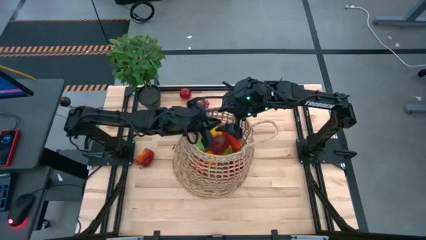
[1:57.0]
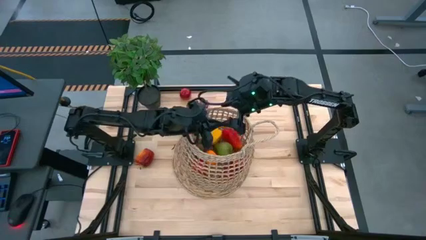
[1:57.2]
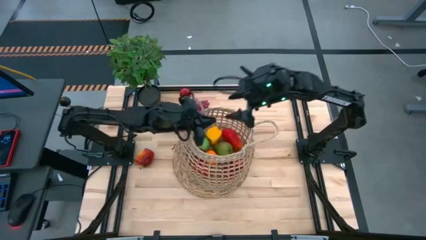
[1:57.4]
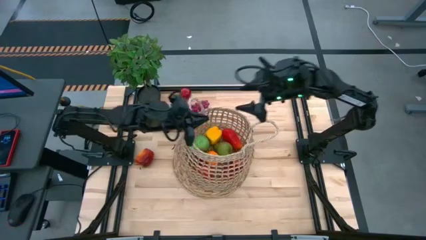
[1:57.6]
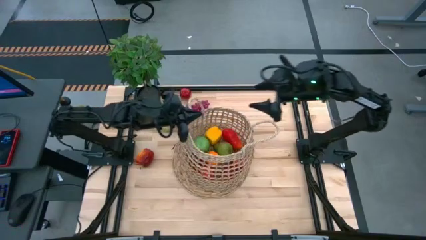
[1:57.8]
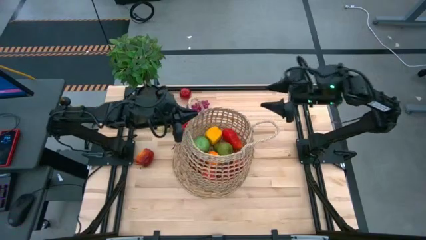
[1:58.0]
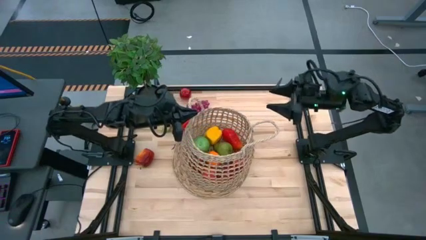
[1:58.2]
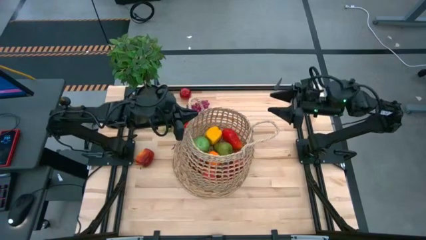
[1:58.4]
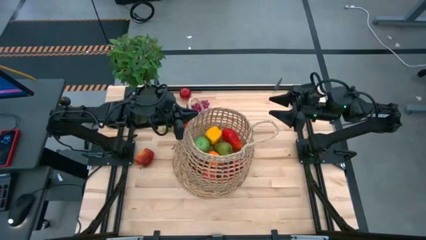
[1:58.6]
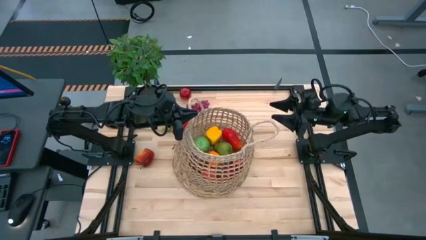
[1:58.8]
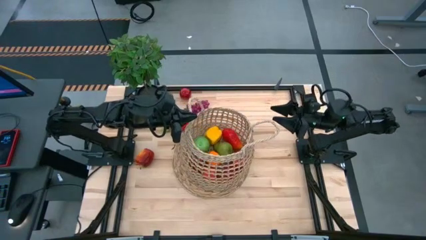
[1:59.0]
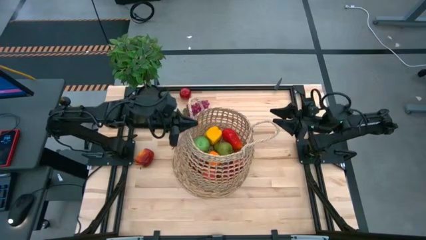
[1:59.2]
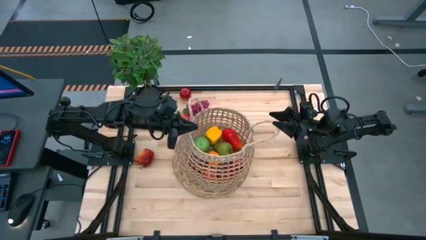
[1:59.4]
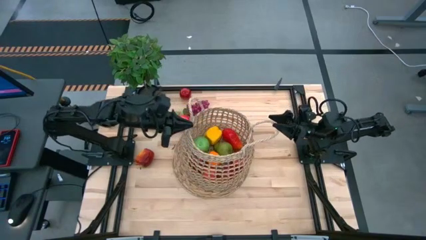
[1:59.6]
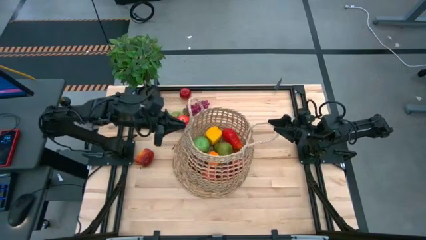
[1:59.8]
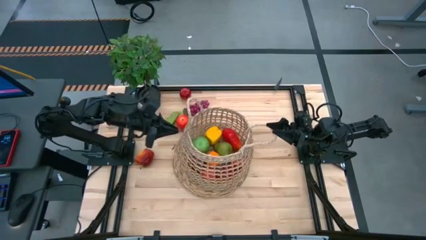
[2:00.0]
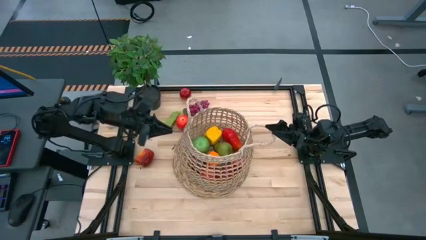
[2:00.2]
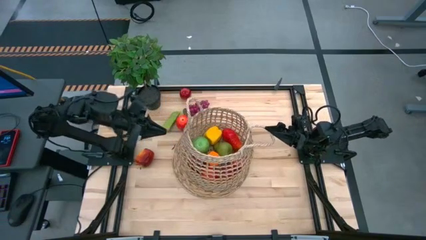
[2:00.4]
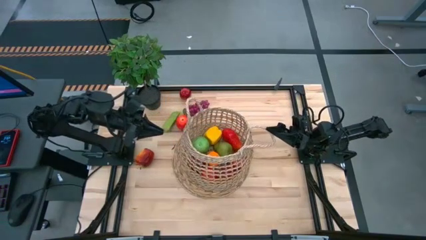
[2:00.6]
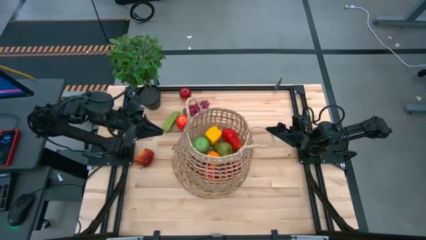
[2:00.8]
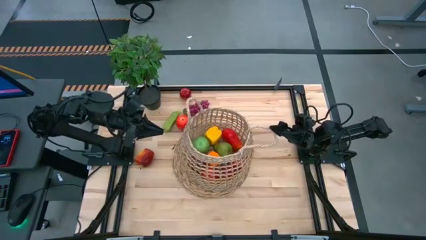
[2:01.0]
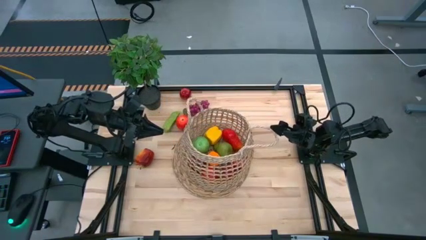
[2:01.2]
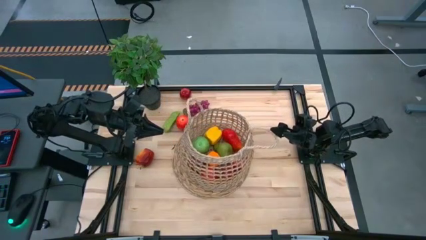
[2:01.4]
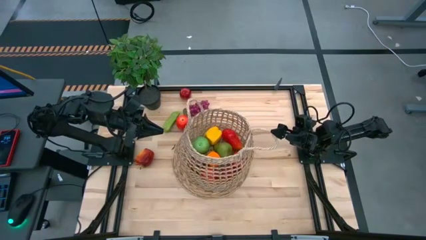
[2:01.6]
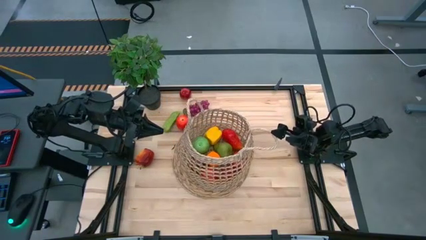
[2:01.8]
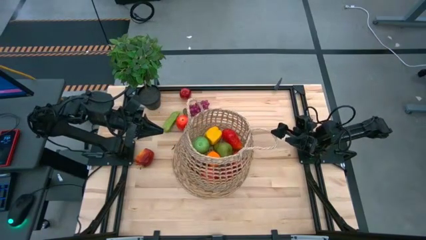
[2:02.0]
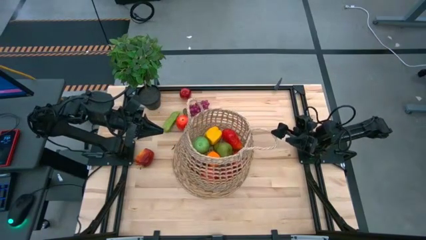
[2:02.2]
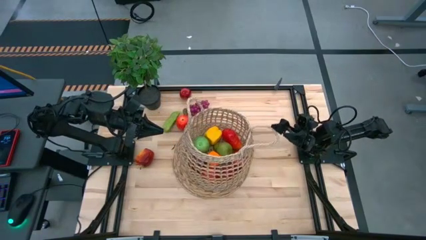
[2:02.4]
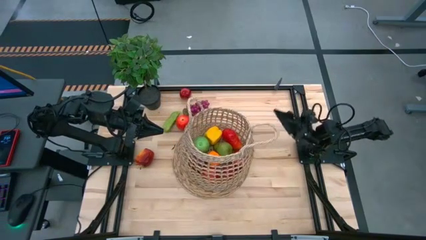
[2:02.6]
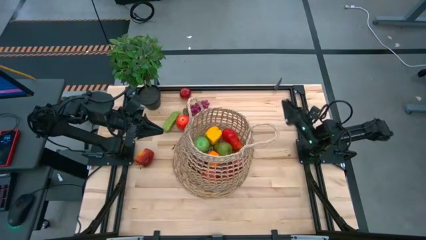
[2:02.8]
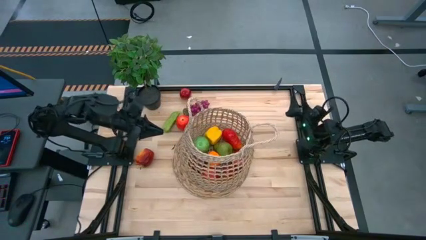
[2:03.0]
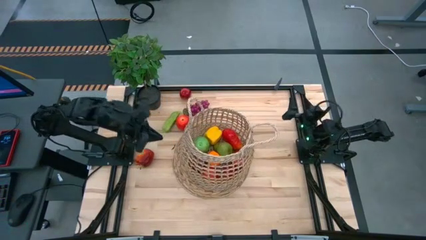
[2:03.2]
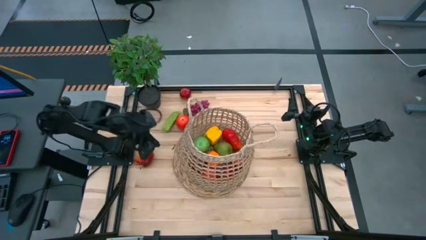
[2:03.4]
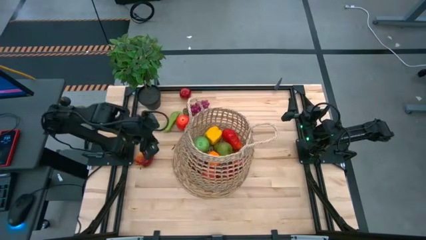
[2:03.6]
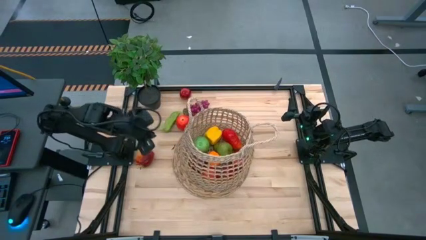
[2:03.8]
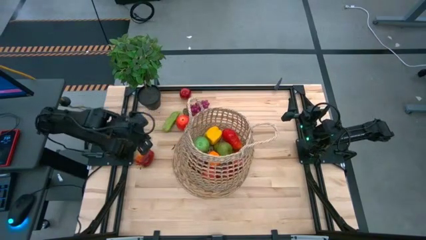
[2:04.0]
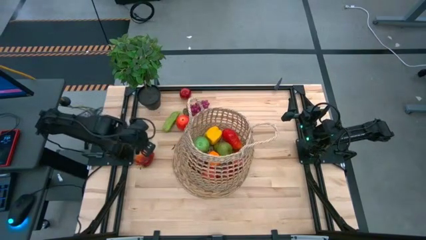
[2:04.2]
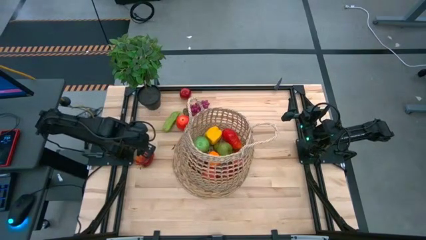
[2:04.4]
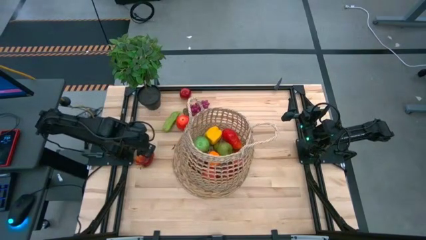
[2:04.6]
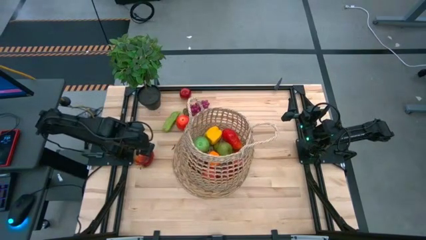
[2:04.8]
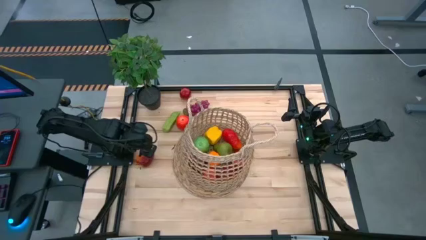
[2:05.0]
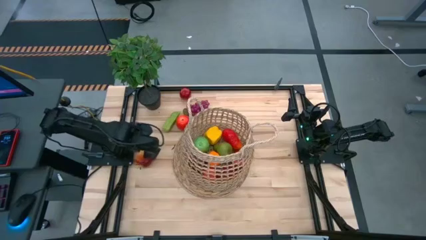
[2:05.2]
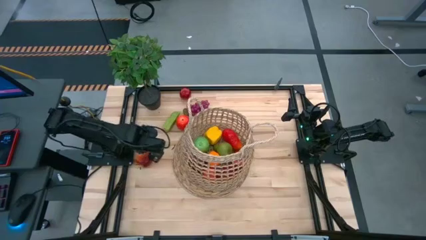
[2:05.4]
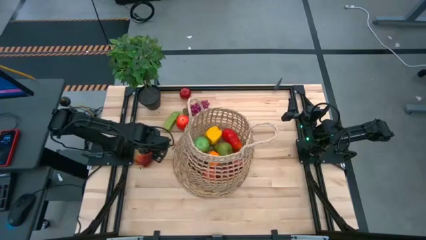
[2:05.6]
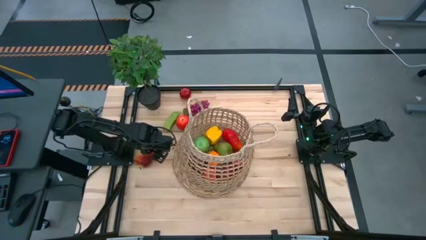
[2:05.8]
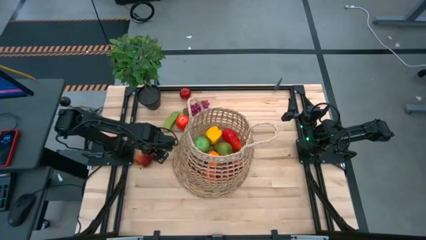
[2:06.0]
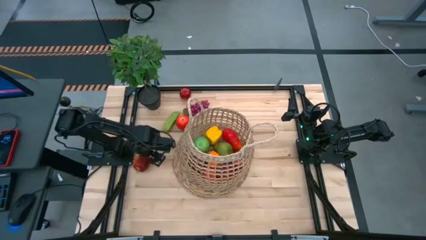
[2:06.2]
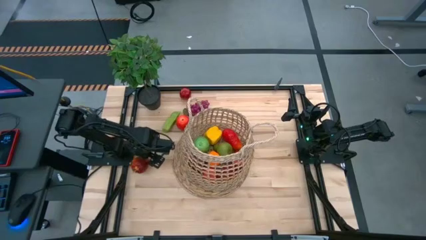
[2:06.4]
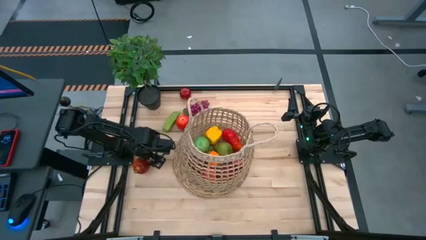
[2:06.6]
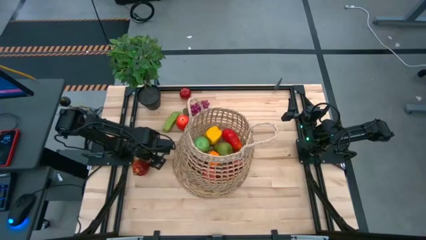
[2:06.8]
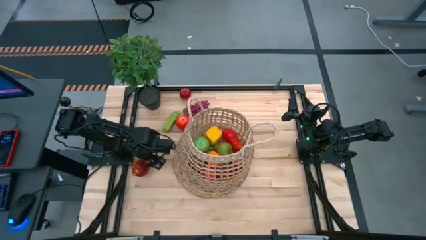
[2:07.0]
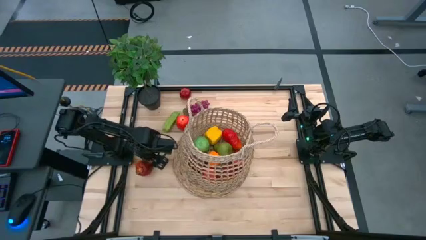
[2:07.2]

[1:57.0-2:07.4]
Task: Build produce basket
Put the red apple into the brown basket

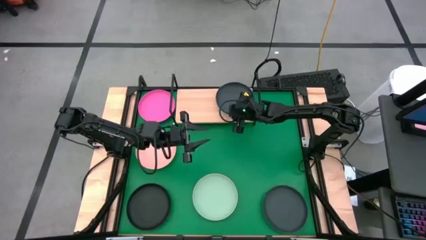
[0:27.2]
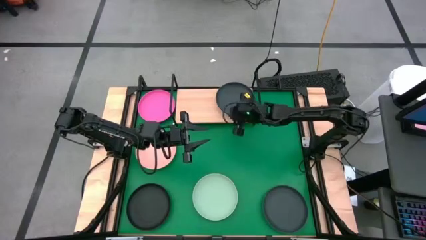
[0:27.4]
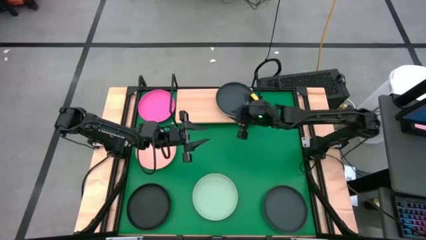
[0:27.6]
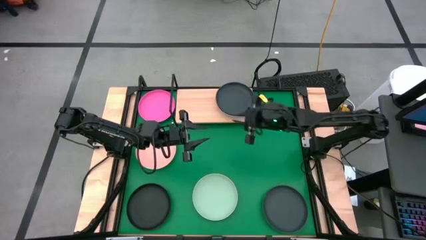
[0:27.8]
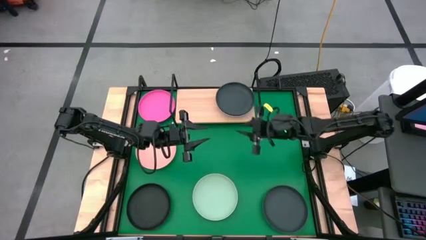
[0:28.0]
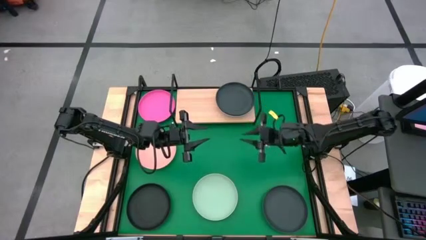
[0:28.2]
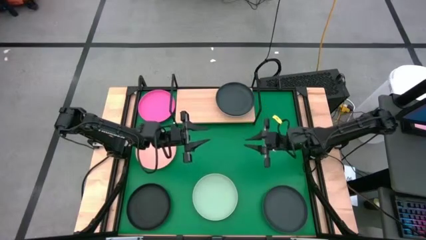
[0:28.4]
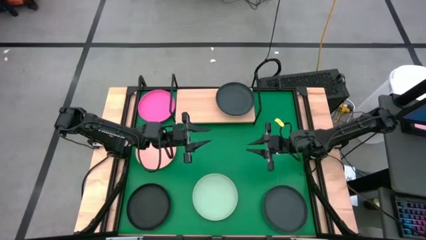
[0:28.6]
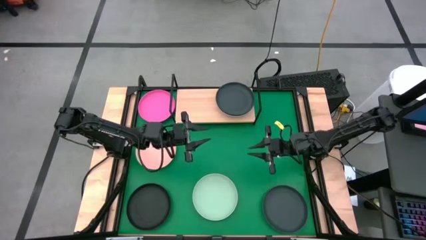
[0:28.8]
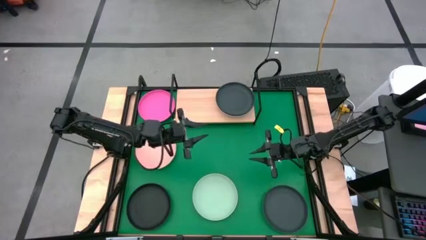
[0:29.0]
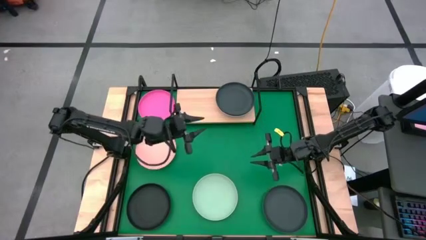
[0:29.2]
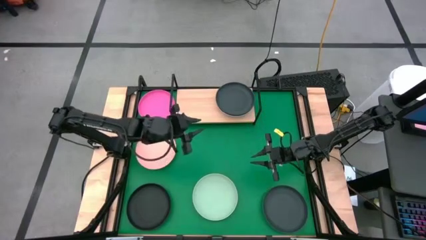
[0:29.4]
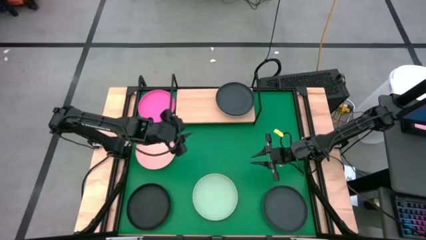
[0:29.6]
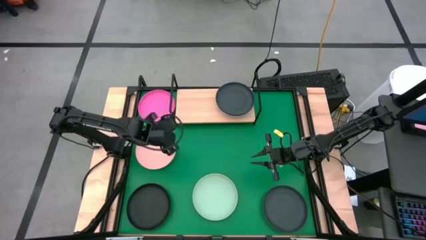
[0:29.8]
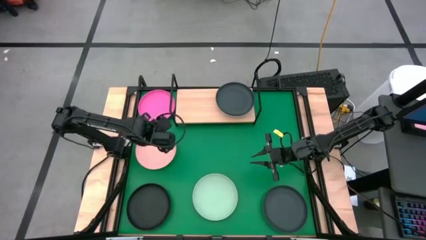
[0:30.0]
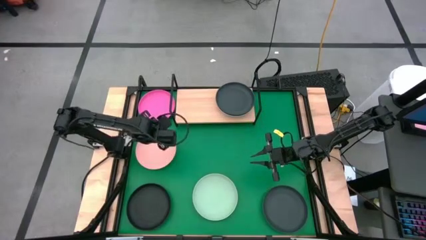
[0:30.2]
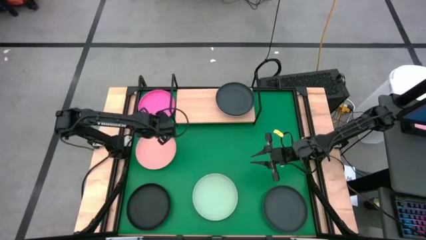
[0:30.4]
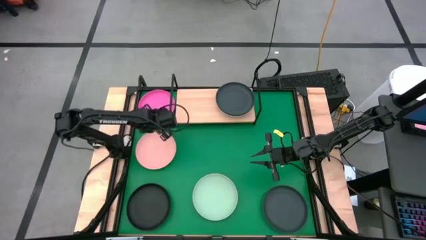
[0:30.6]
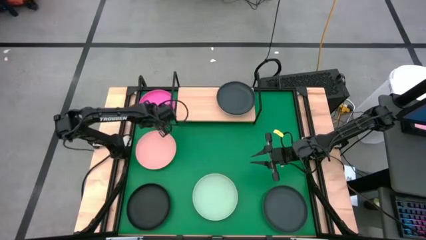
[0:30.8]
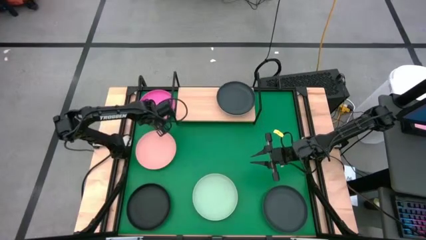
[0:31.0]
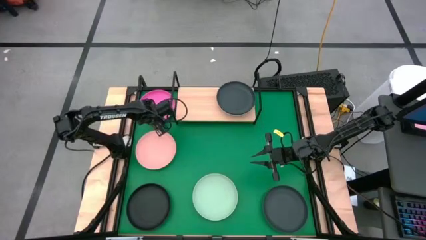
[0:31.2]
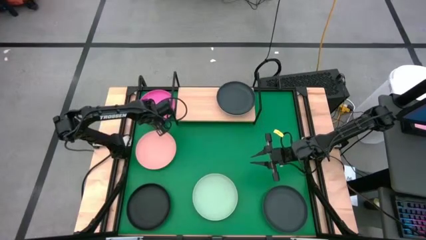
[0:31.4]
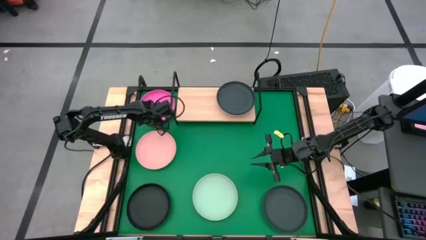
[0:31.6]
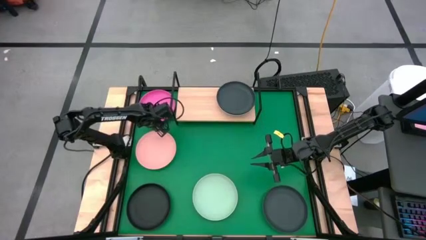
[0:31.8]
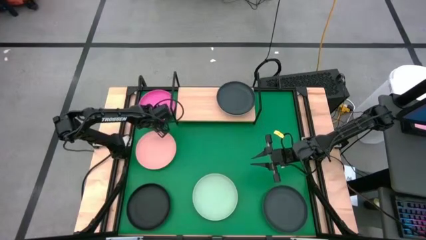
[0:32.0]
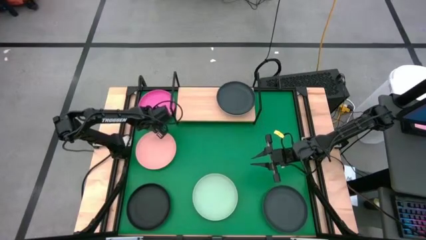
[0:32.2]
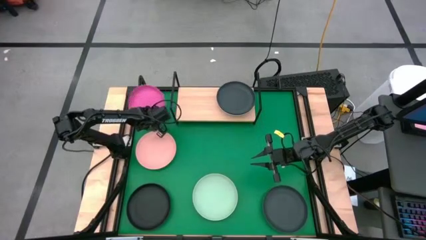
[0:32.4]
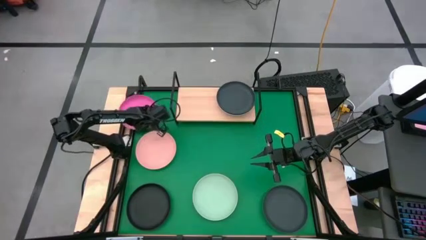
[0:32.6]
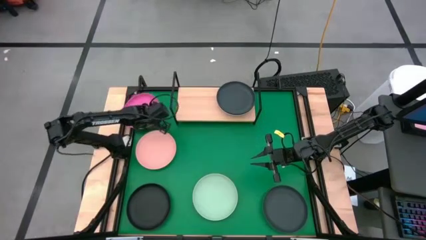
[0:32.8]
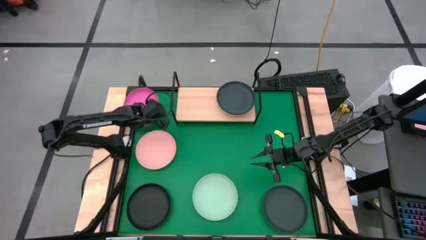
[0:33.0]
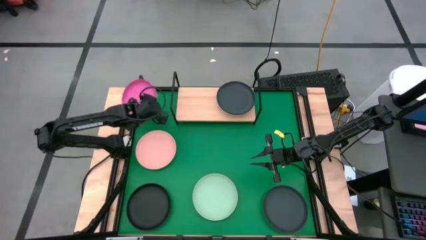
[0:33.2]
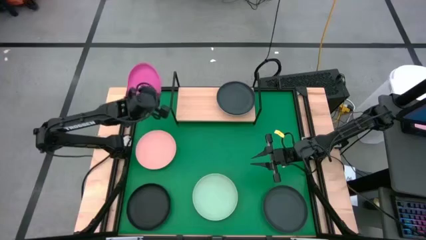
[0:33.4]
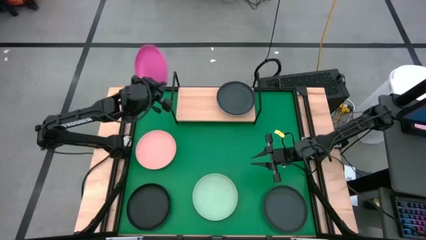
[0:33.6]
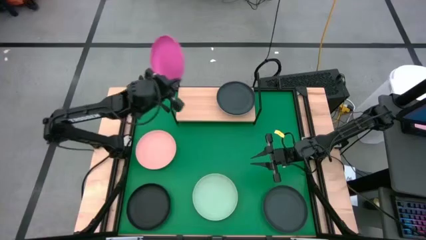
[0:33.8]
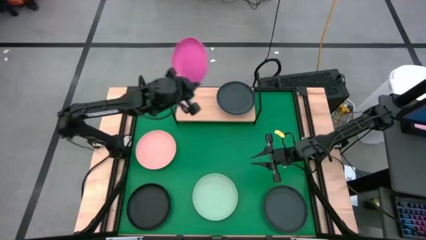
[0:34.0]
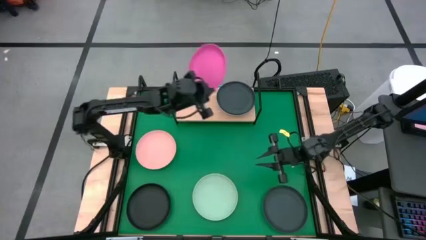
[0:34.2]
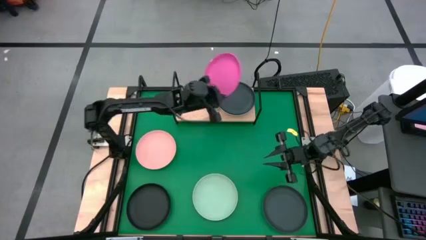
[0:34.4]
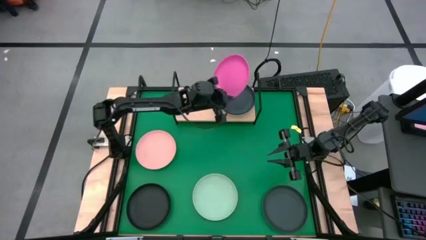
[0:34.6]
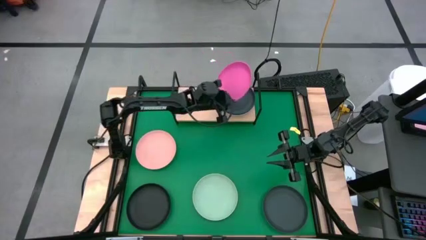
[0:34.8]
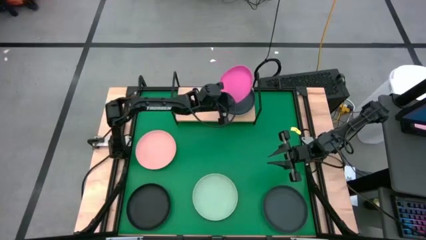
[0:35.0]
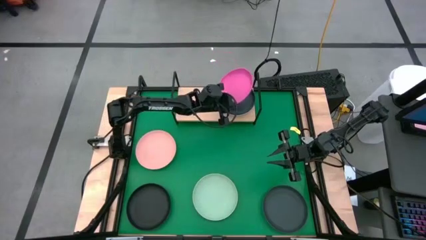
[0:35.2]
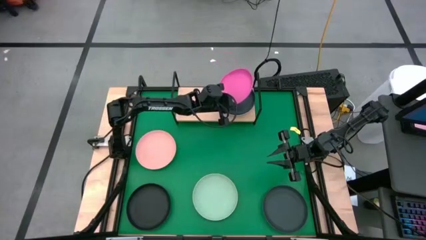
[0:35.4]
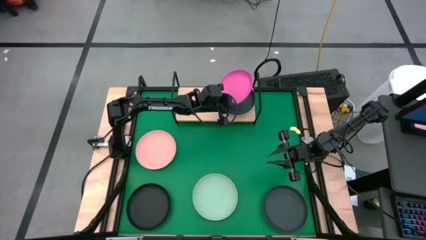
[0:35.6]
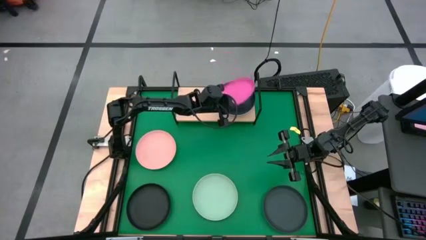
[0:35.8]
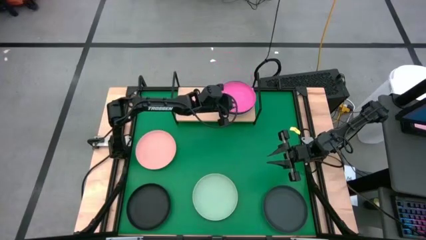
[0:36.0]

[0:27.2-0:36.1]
Task: Place and stack plates onto a shelf
Stack the pink plate on top of the black plate on the shelf
